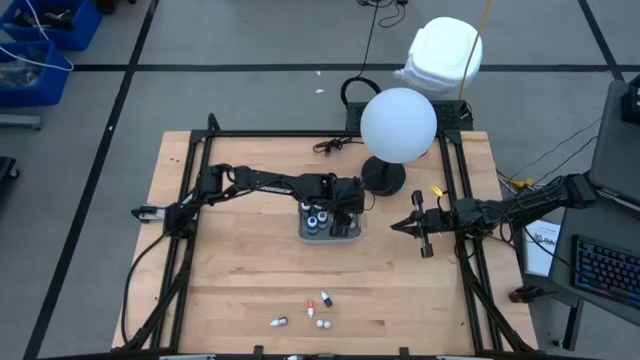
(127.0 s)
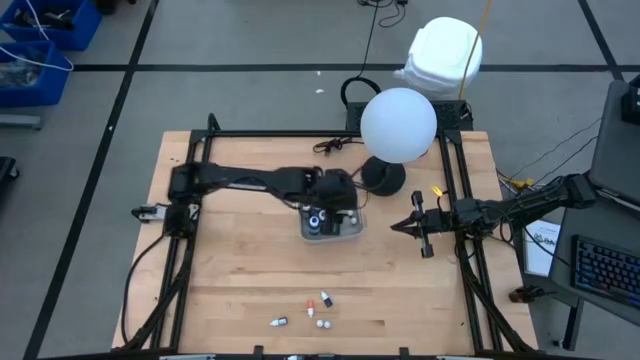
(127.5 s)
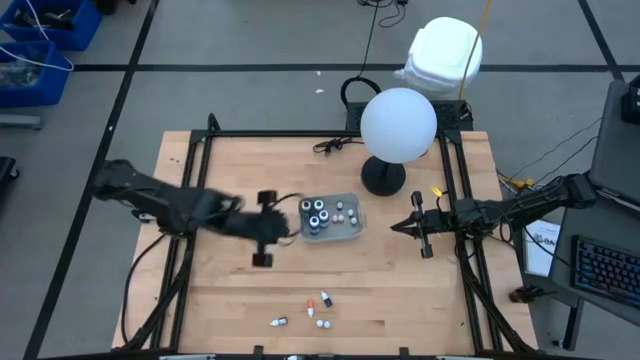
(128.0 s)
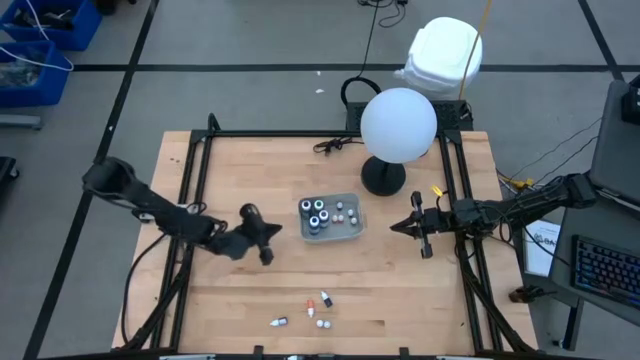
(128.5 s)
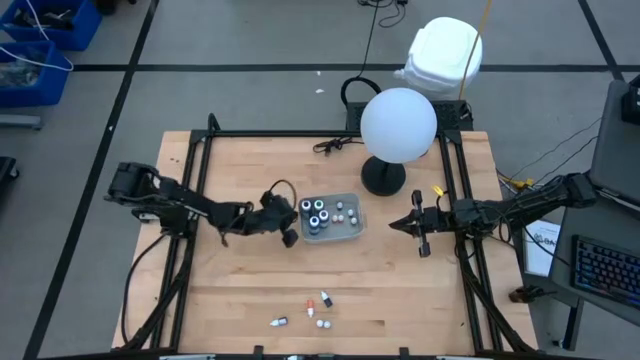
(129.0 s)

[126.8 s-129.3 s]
Task: Pick & Place food coloring
Adjust the gray bin

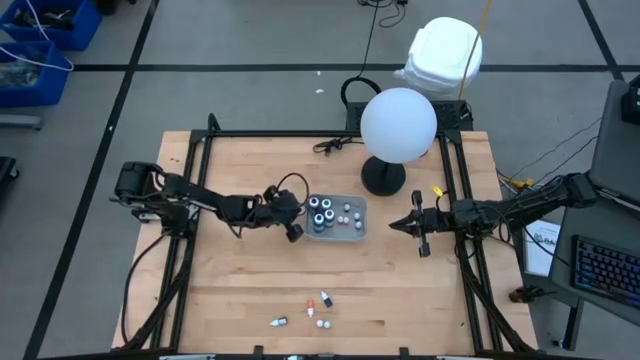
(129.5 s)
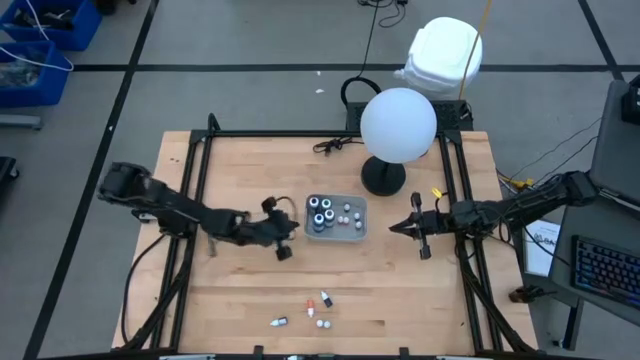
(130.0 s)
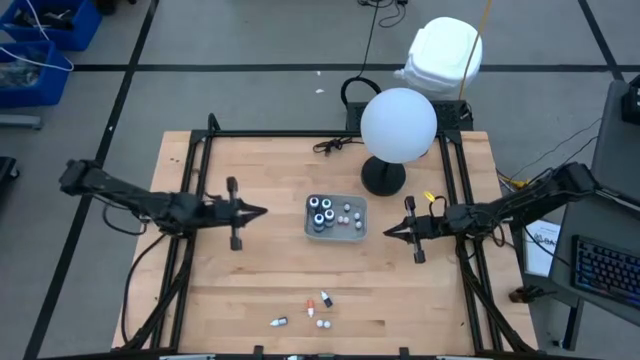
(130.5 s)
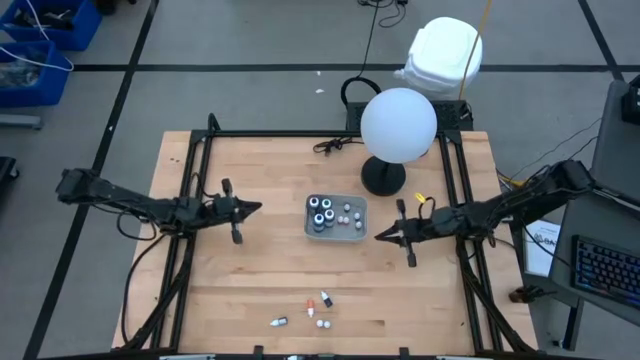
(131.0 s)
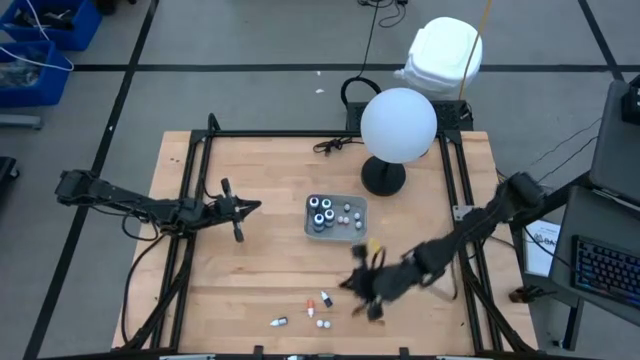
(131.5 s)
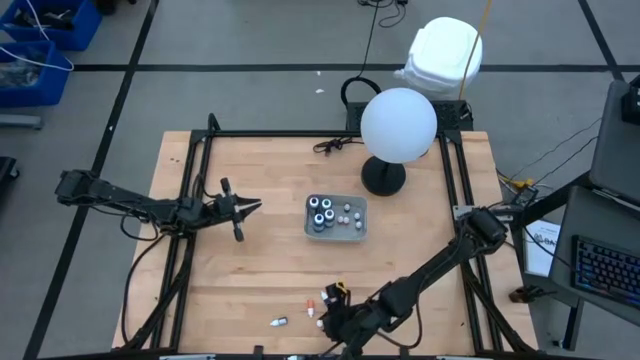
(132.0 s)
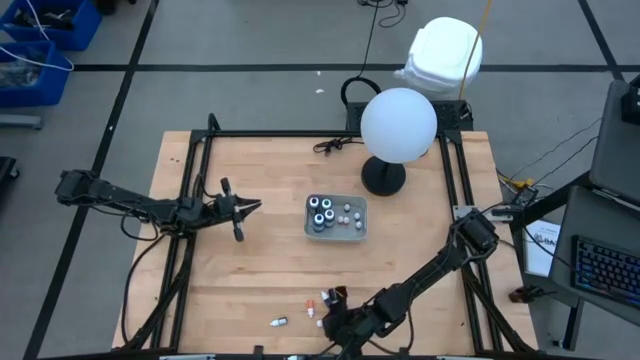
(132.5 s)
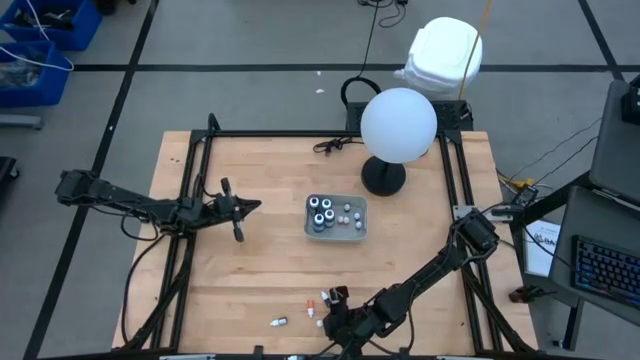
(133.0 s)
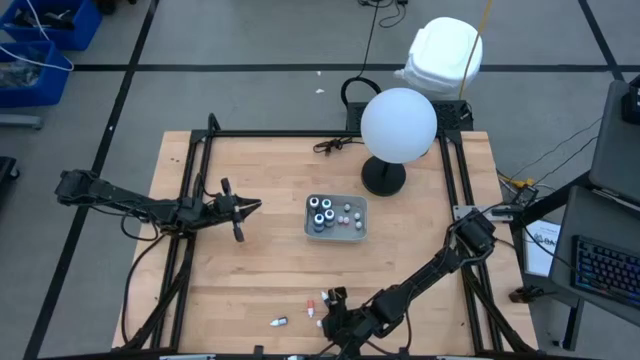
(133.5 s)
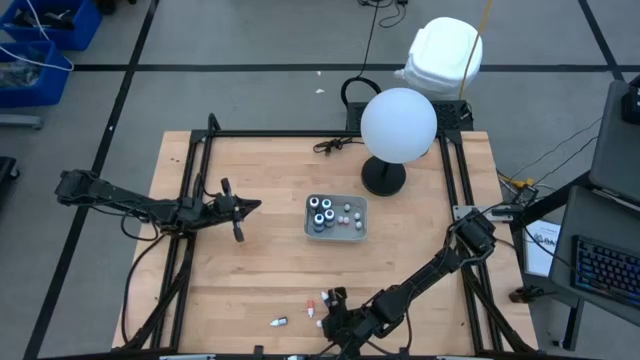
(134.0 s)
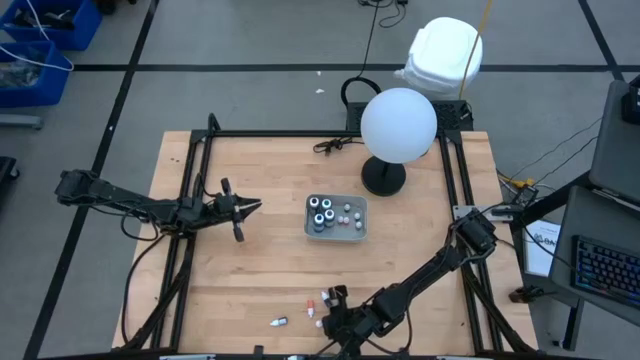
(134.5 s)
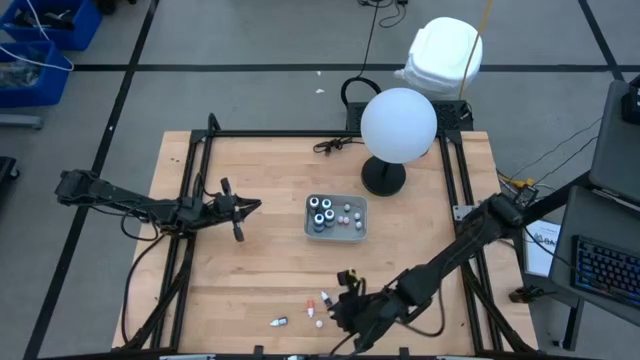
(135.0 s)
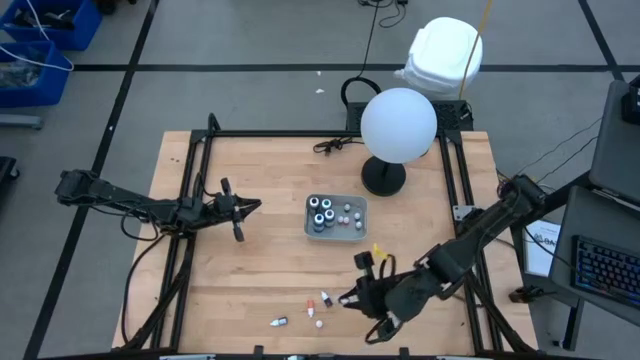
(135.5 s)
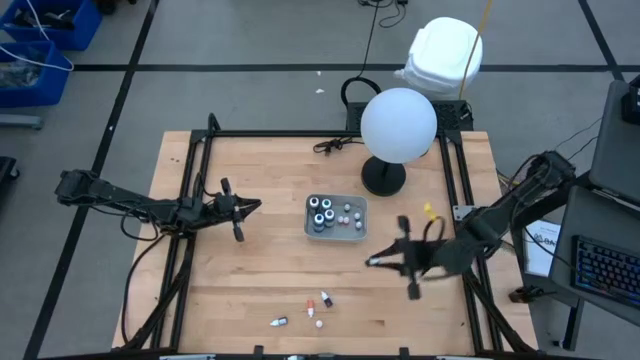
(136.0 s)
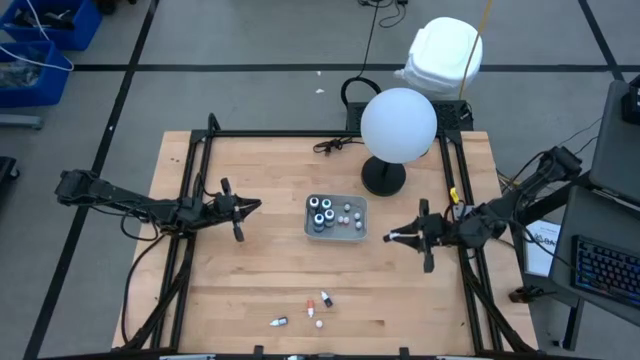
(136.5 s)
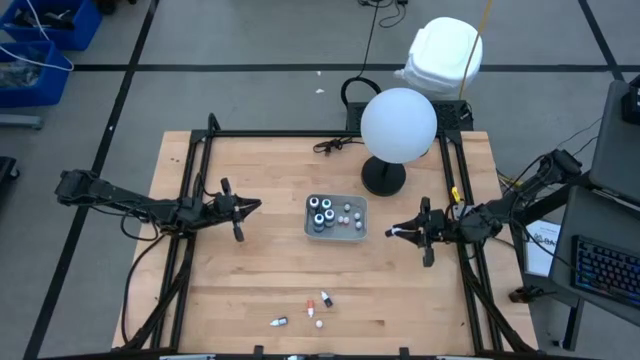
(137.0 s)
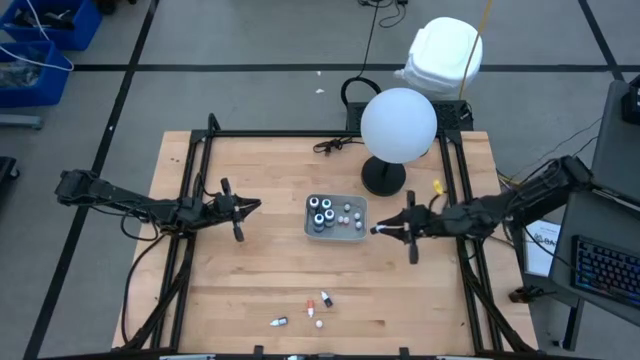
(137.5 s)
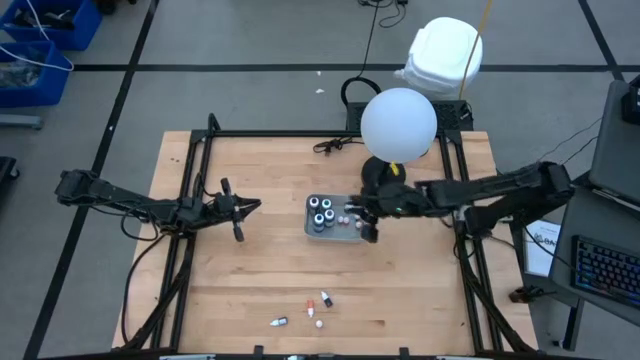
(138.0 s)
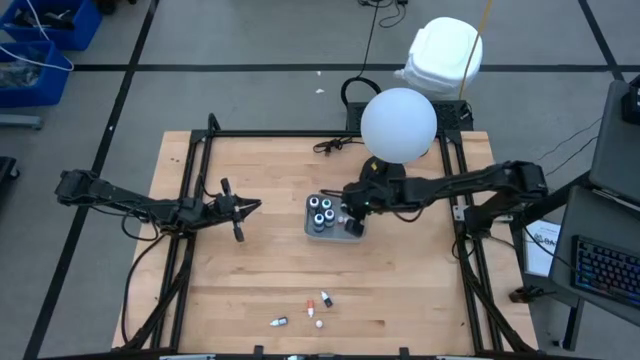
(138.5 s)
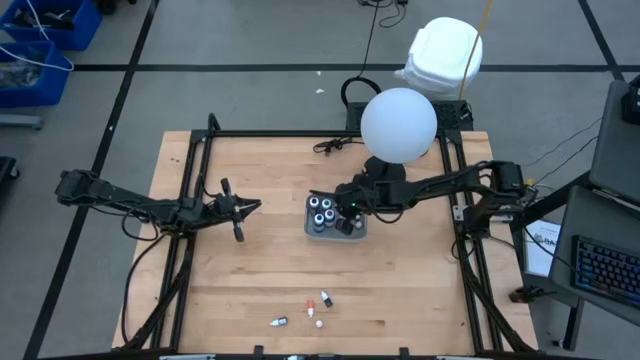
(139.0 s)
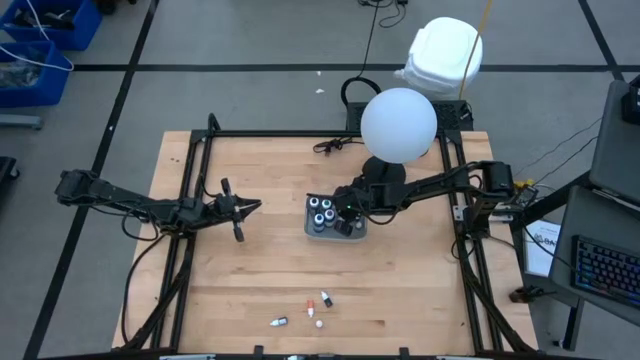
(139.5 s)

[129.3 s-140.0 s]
Put the small green food coloring bottle into the gray bin

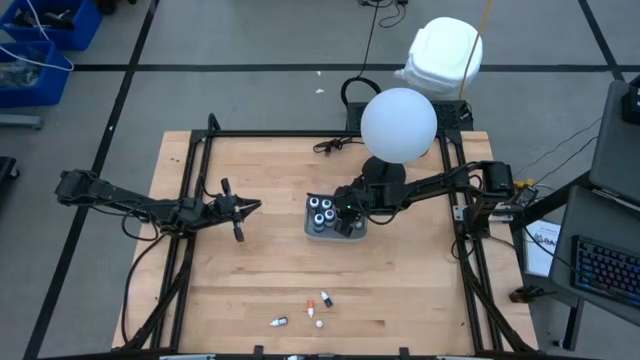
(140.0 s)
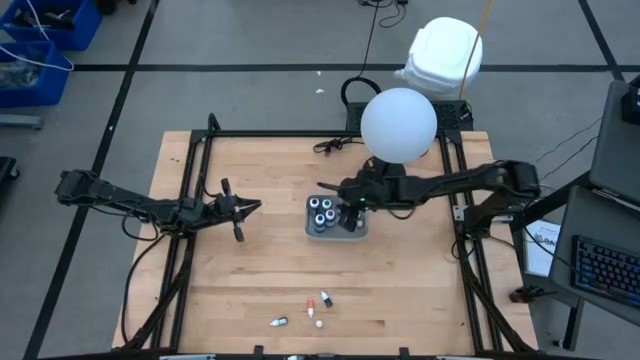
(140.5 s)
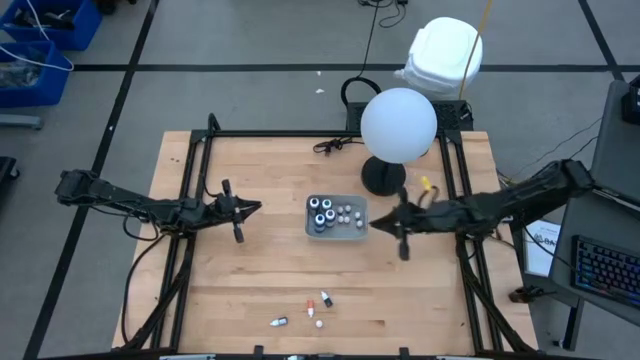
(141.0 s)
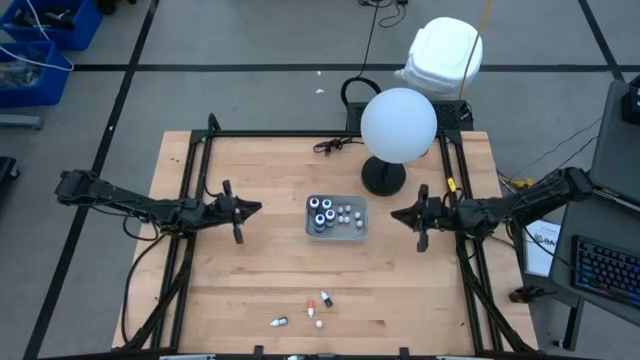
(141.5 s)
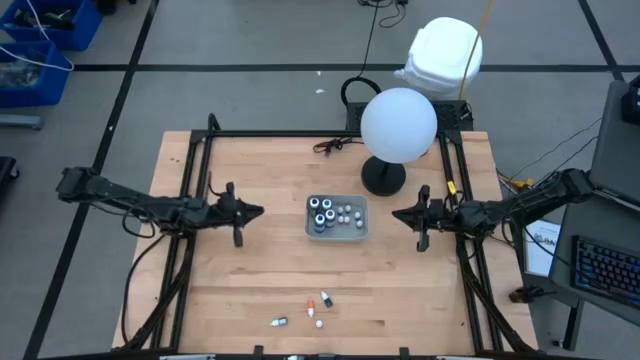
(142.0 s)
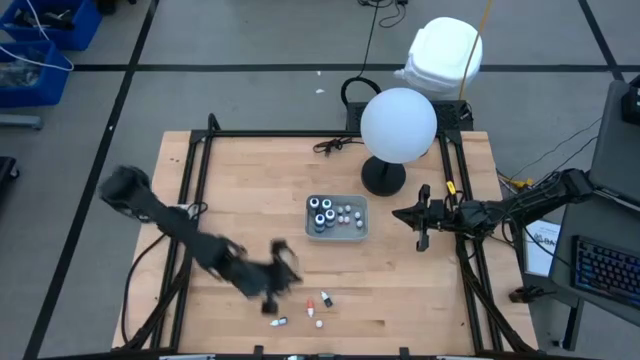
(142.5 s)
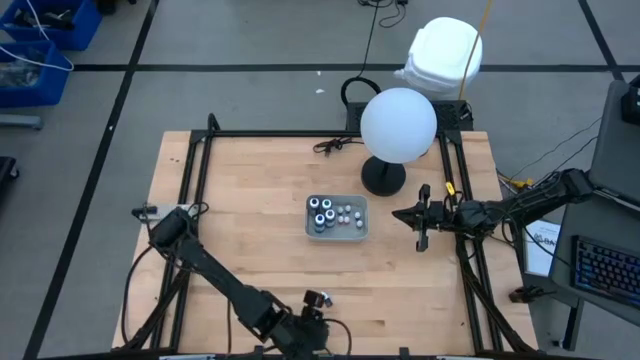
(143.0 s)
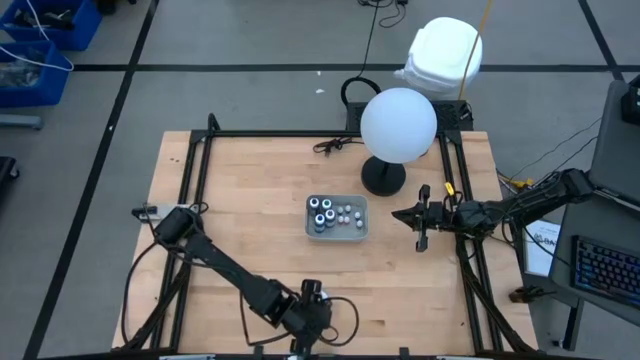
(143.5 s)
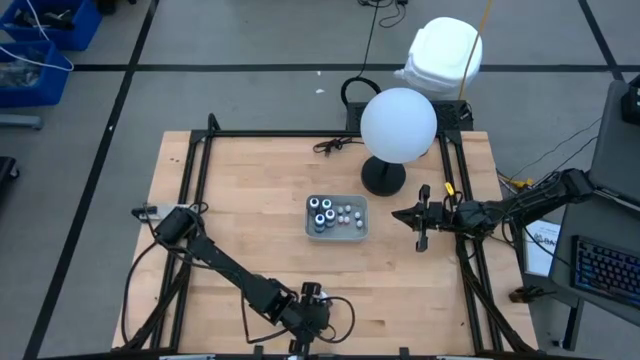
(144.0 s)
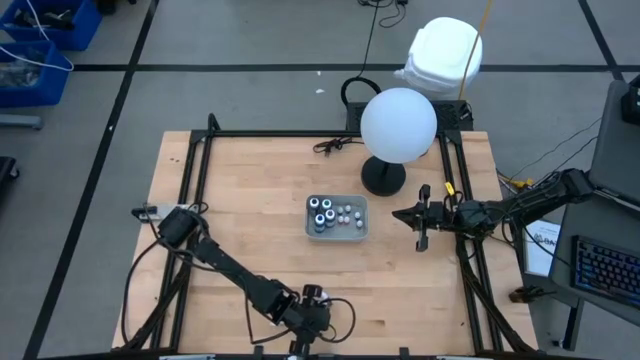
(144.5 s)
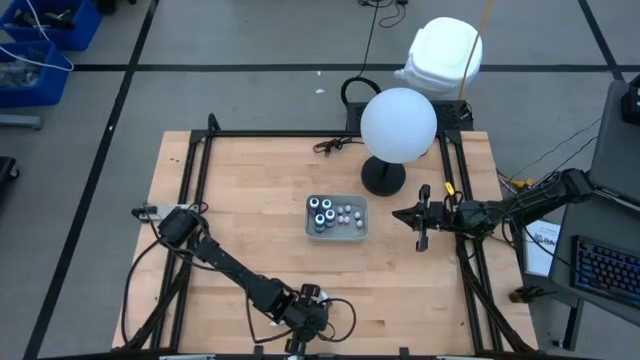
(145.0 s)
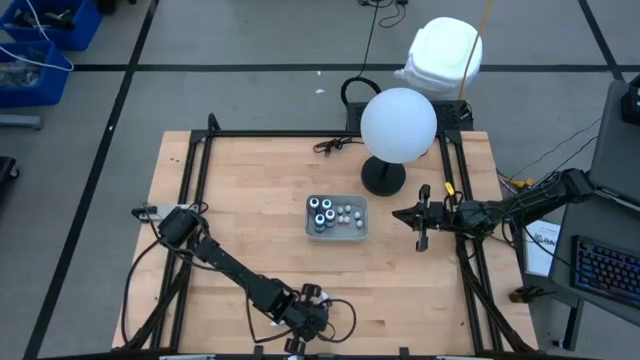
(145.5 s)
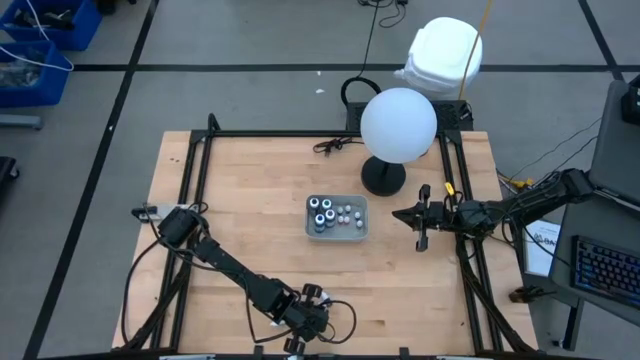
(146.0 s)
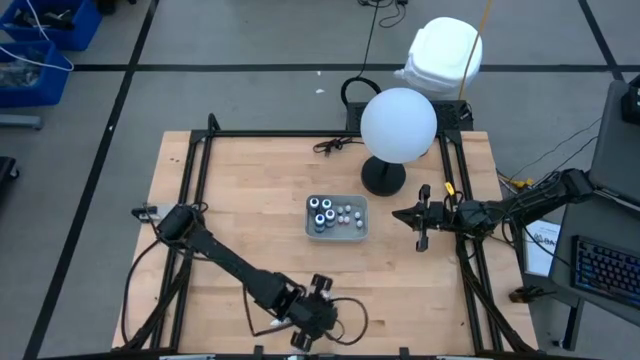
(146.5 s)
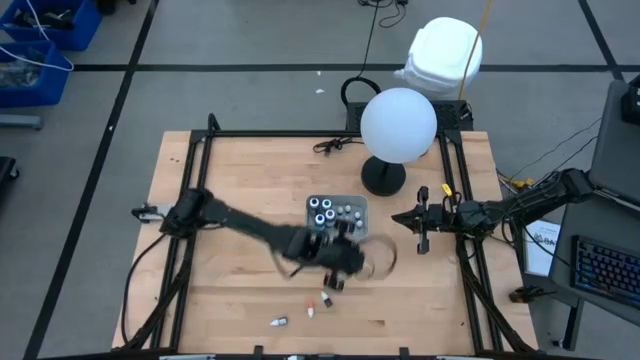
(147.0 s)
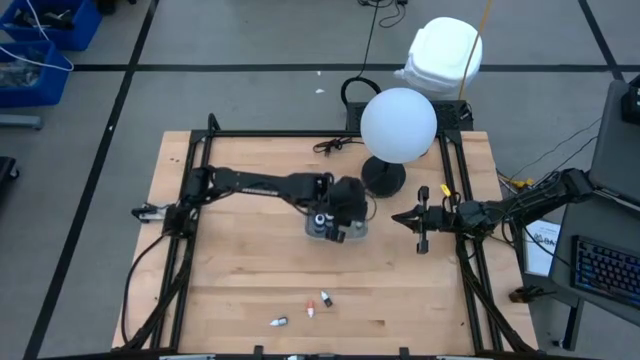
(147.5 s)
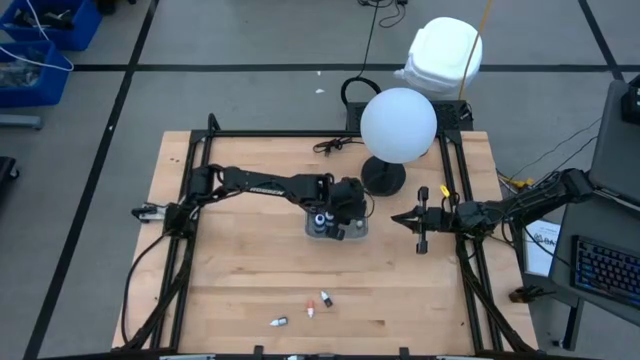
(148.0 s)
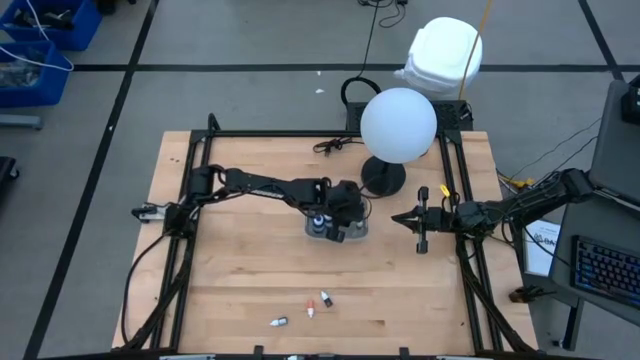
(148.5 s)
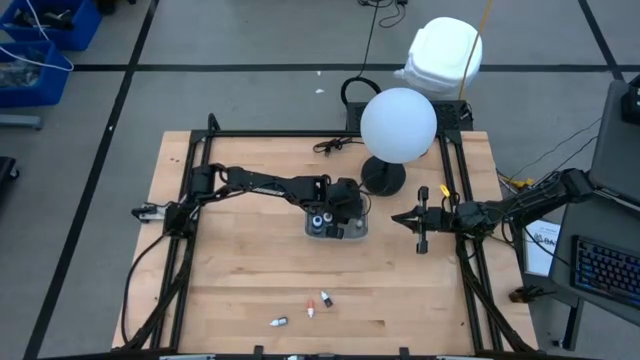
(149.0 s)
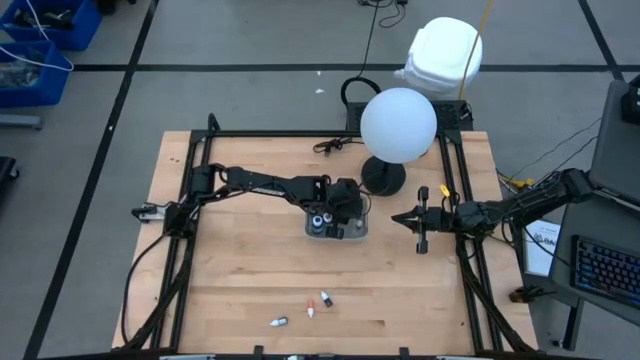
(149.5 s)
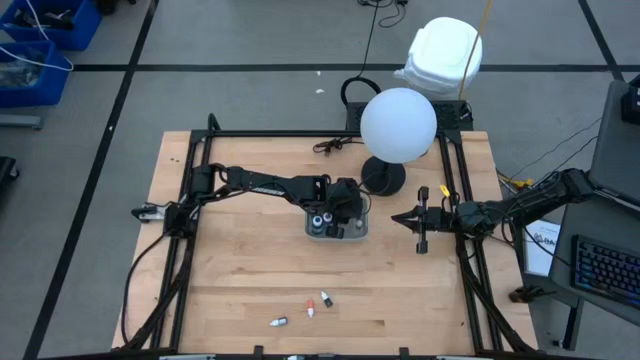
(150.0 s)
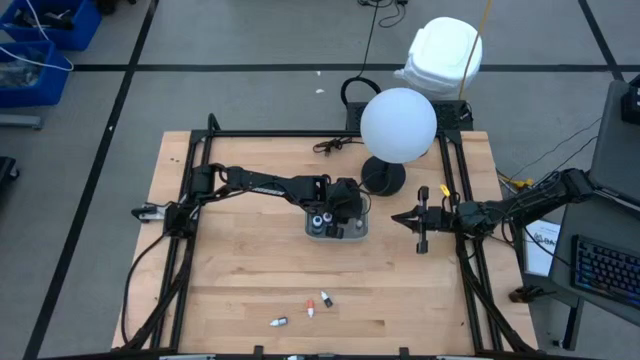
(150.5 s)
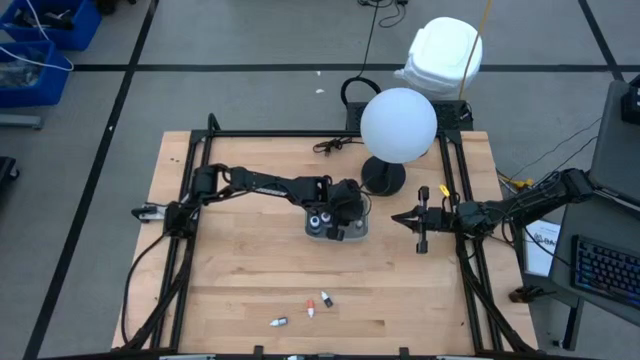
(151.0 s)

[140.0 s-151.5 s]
Put the bottom small orange food coloring bottle into the gray bin
